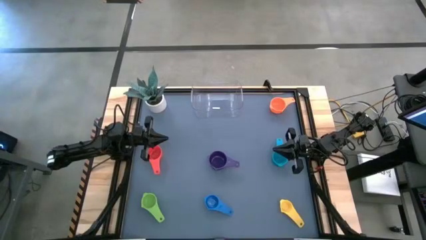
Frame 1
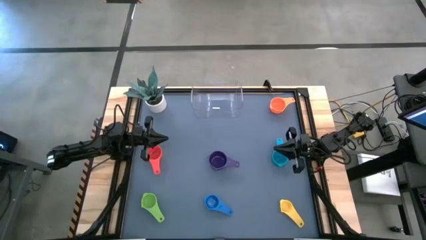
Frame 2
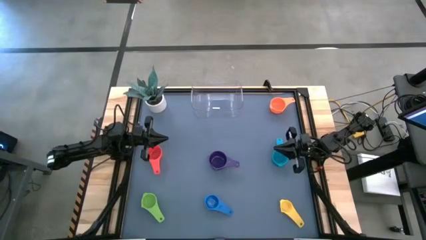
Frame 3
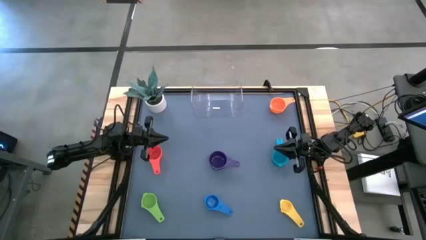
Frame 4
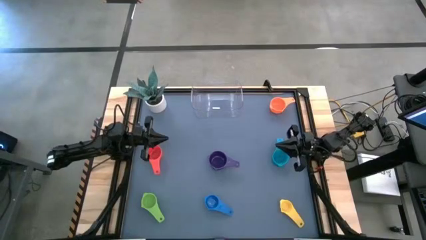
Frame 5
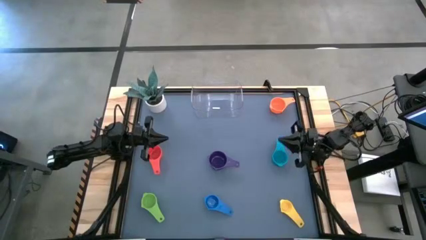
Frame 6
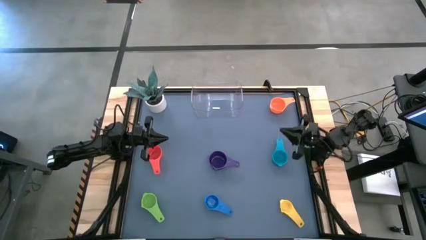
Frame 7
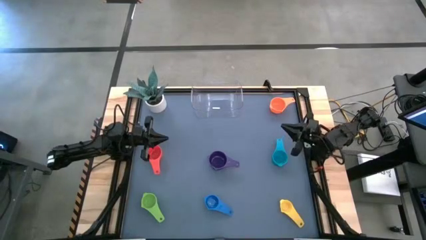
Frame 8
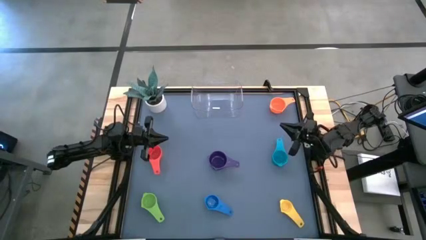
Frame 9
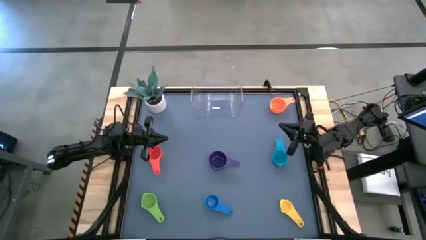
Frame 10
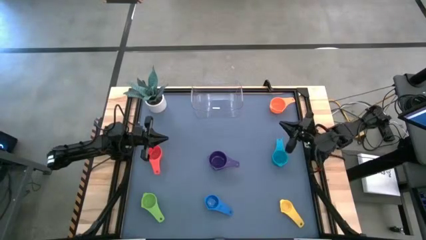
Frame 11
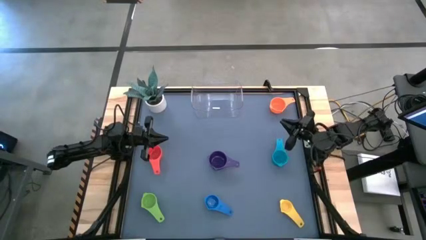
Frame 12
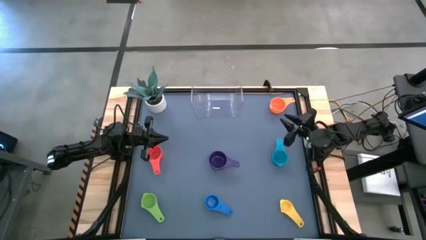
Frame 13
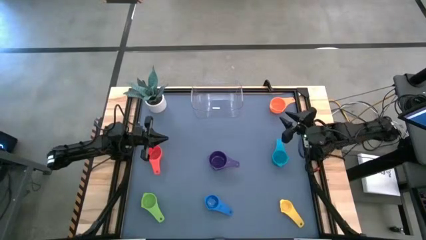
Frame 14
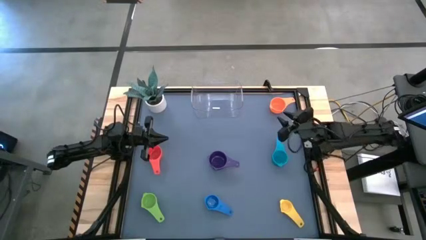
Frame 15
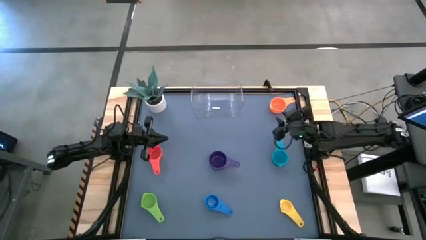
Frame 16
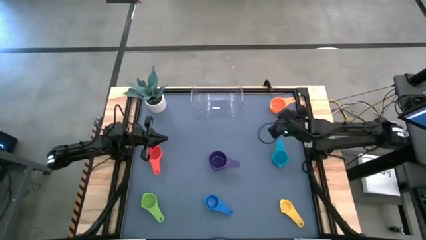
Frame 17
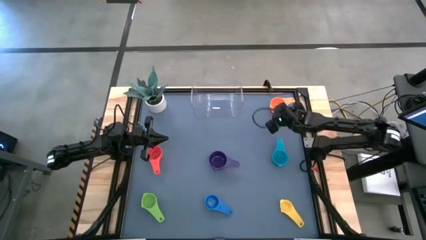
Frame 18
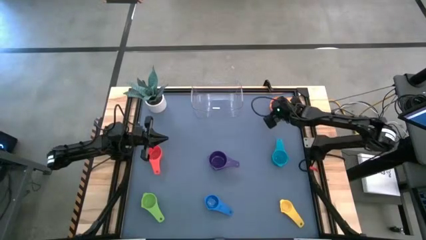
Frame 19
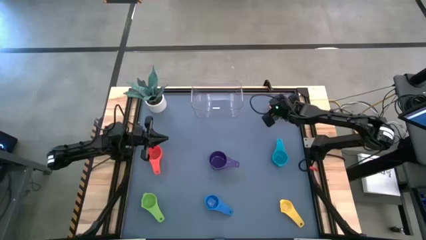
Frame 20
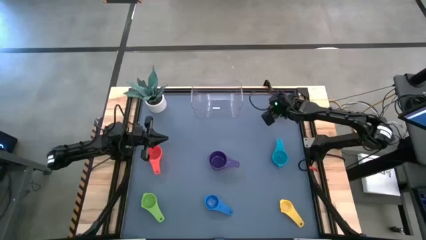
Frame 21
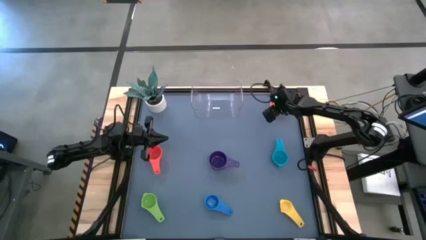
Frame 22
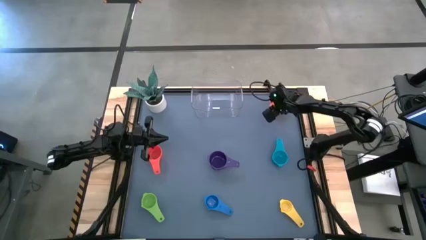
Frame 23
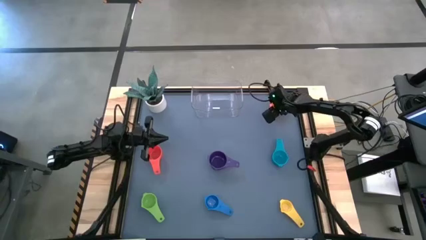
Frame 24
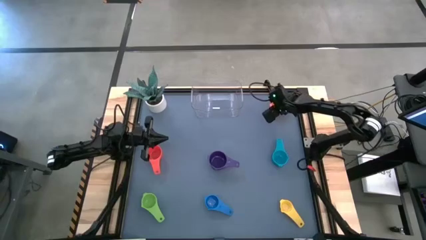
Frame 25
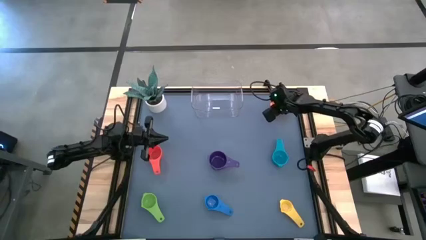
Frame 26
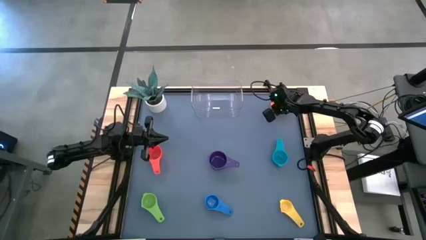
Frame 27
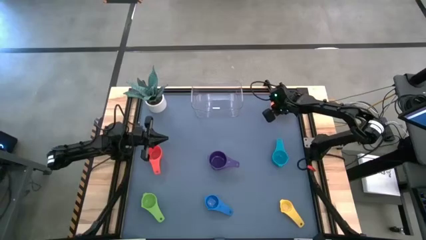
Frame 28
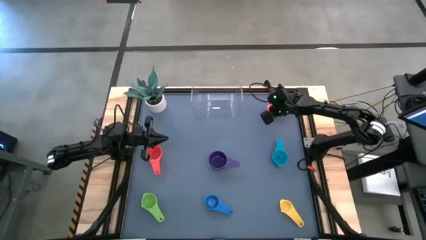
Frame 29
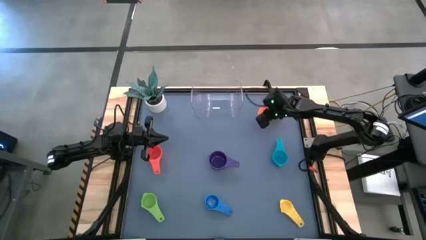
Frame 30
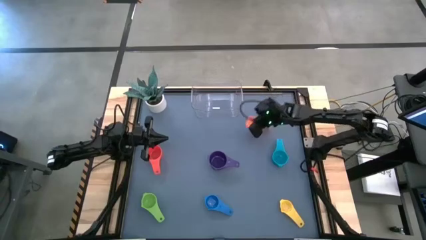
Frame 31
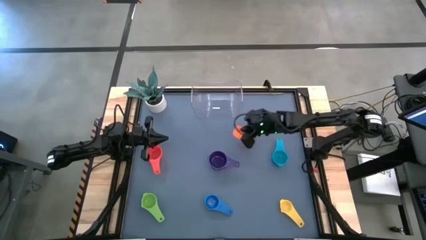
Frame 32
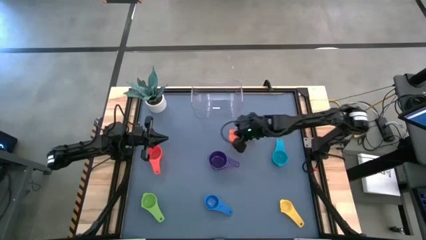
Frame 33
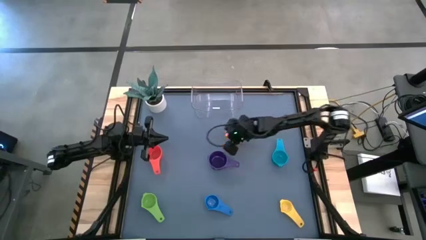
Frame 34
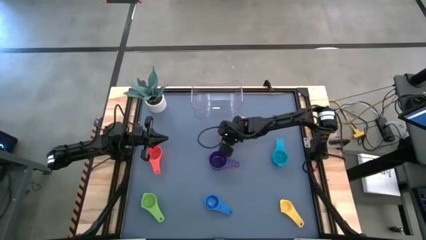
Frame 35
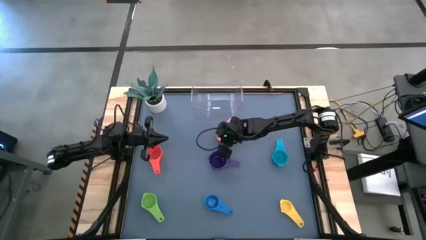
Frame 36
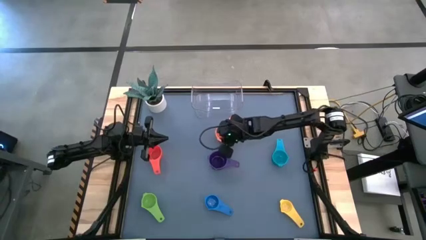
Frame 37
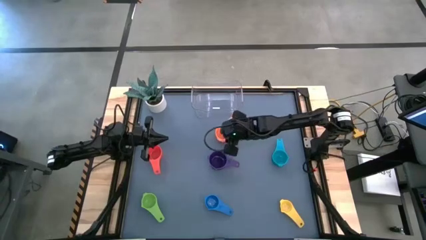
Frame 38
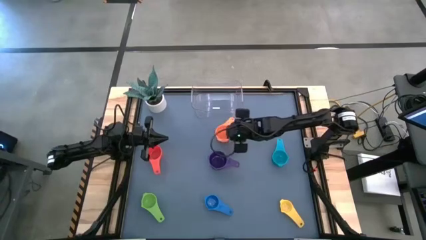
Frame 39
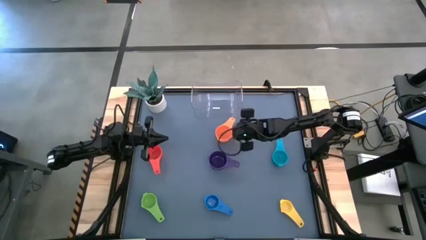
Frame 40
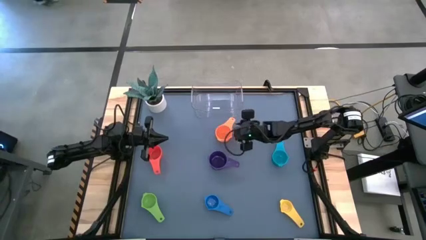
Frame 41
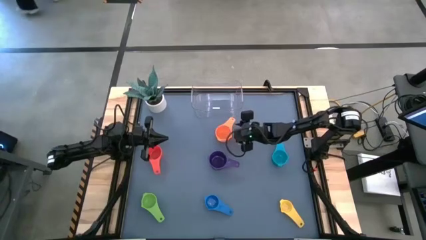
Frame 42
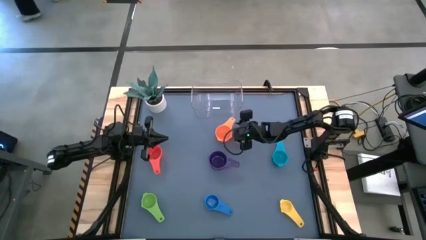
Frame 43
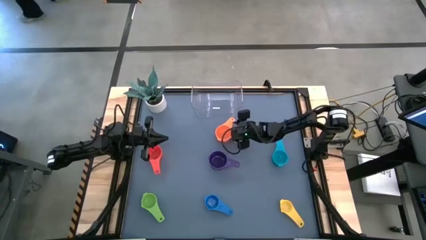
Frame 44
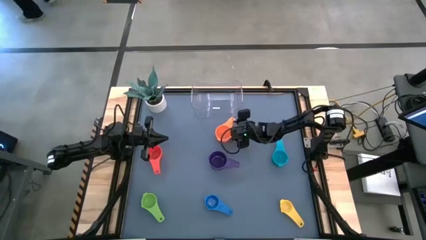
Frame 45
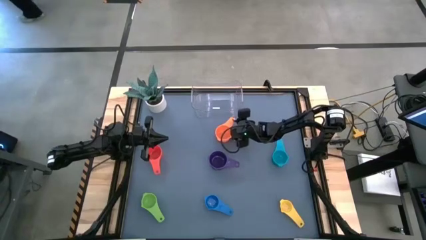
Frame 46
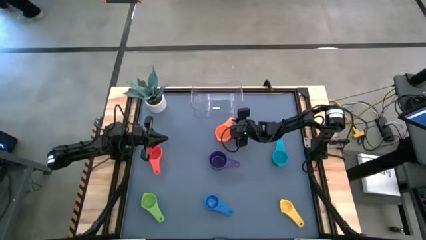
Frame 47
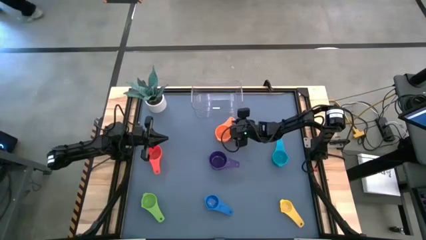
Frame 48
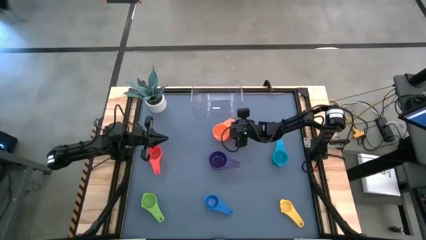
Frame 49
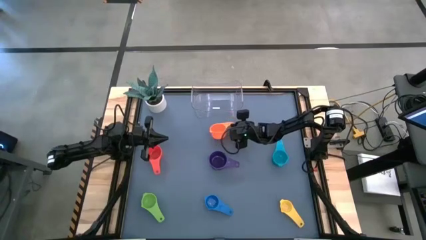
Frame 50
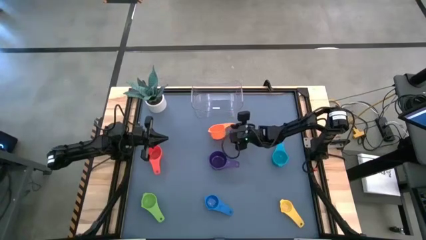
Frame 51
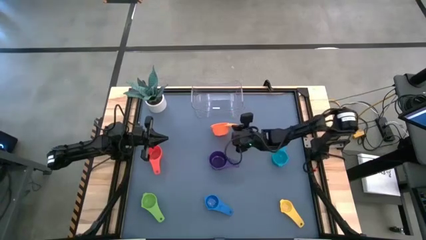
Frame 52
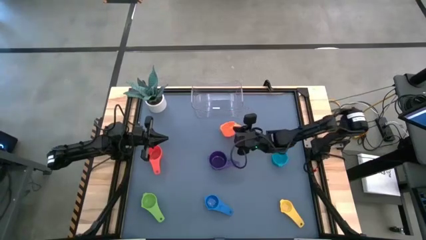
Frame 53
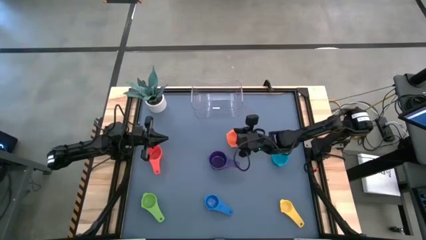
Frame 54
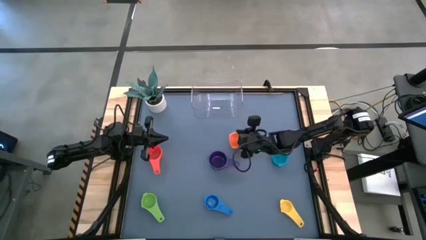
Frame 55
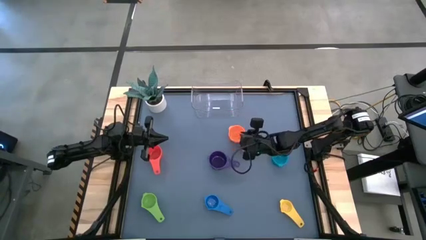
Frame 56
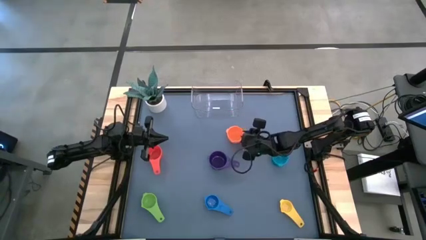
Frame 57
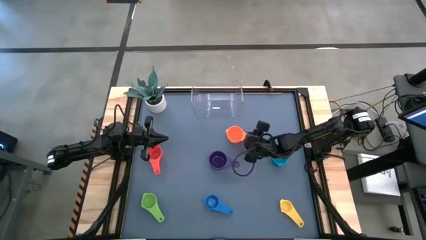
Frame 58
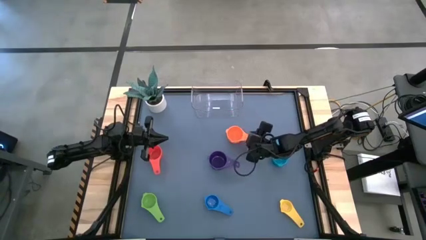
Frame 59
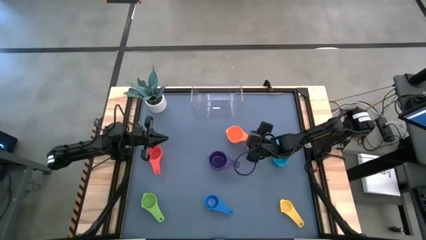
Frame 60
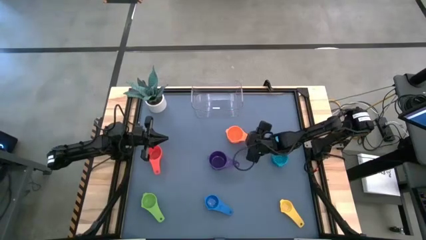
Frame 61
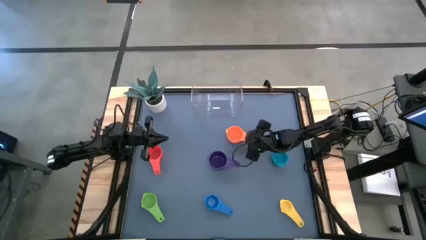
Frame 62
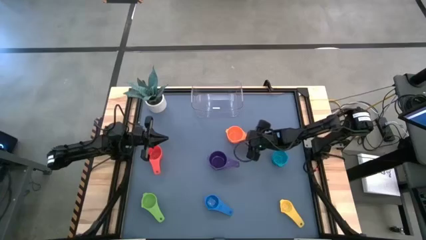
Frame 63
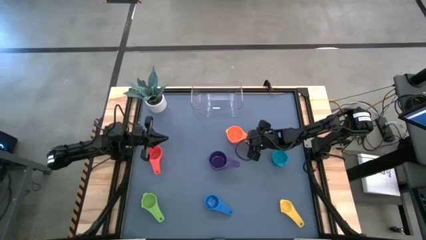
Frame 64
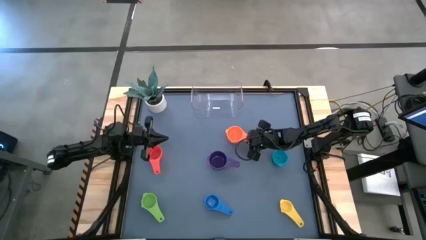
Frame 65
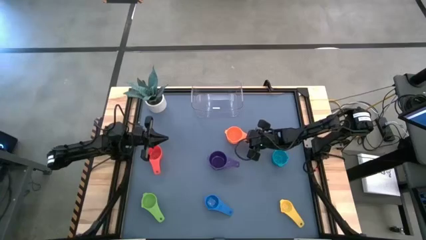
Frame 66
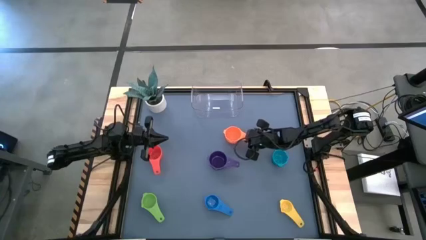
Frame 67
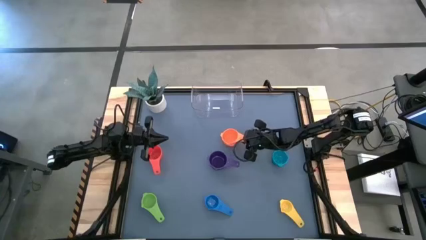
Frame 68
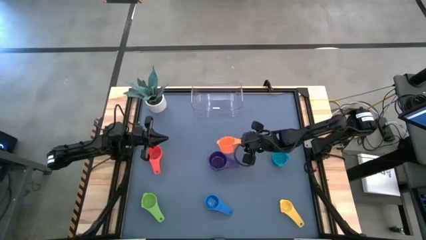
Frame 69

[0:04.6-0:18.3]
Task: Nest measuring cups in basket
Stack the orange measuring cup on top of the purple measuring cup
